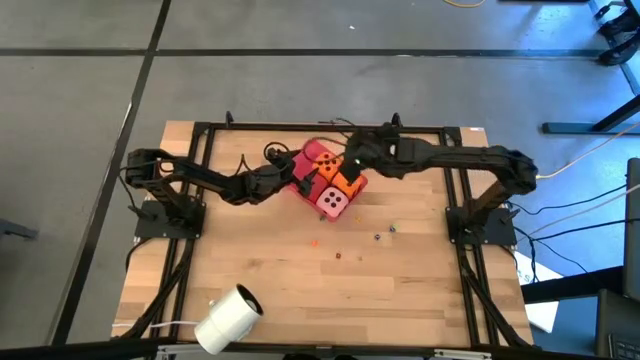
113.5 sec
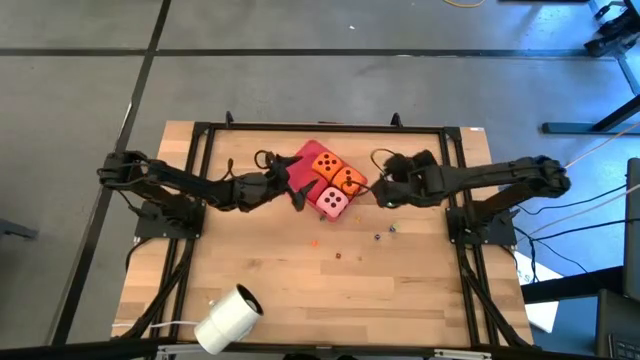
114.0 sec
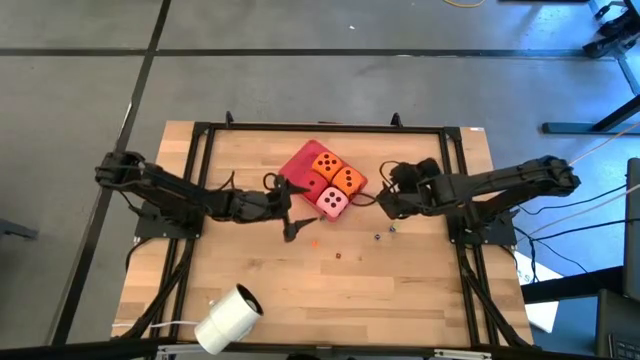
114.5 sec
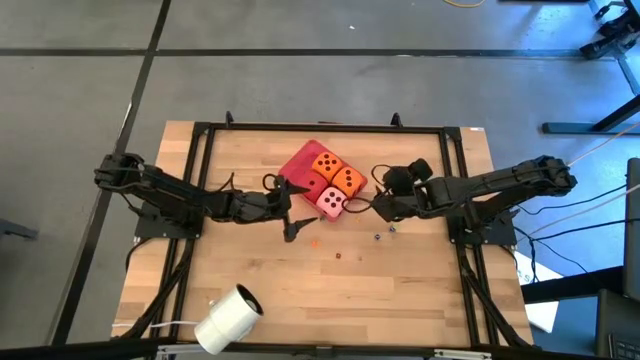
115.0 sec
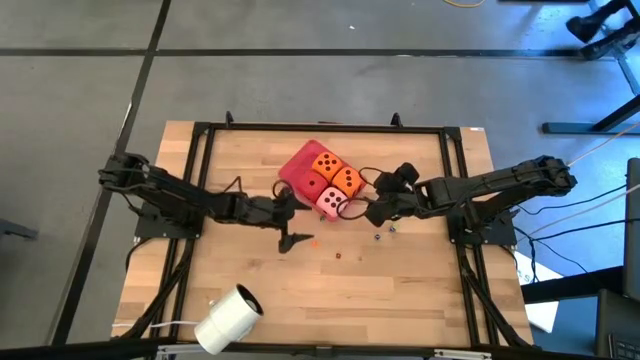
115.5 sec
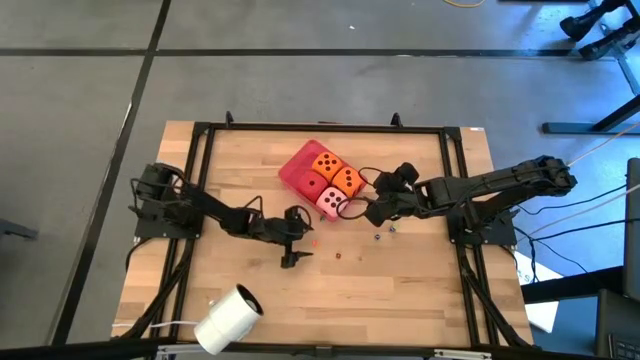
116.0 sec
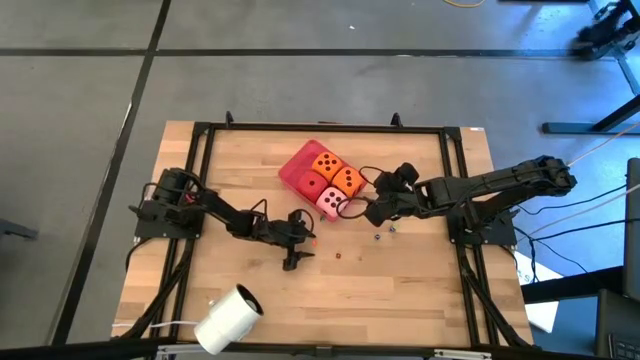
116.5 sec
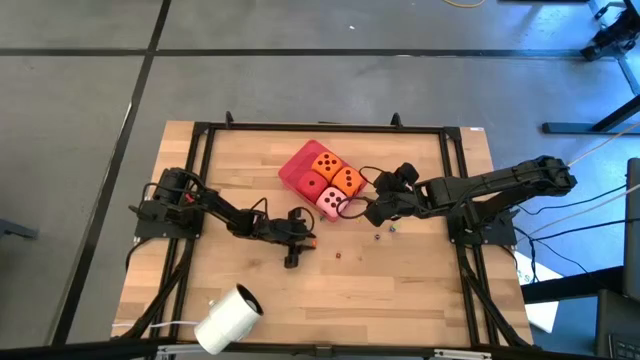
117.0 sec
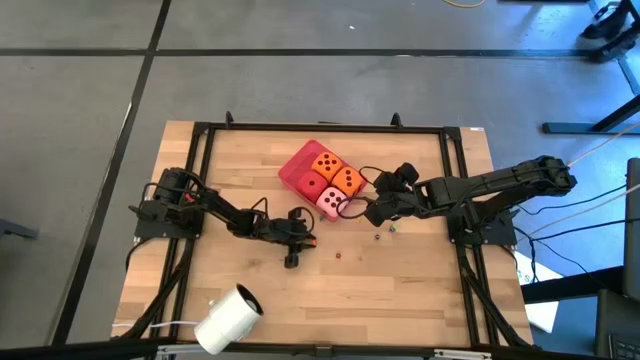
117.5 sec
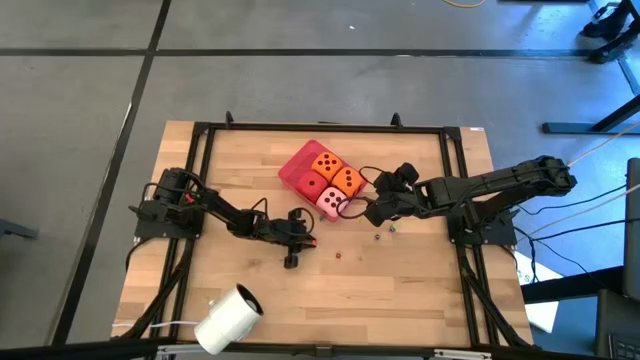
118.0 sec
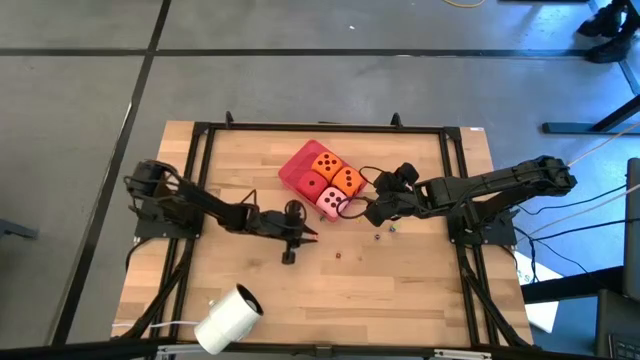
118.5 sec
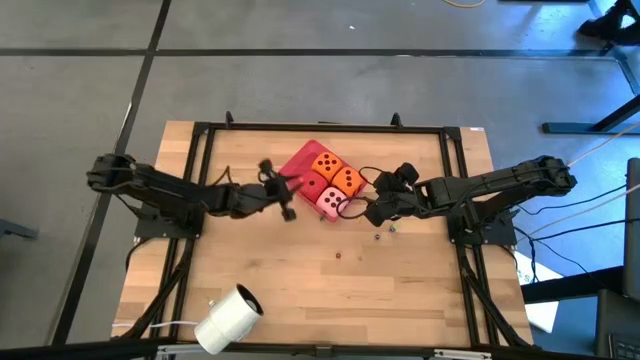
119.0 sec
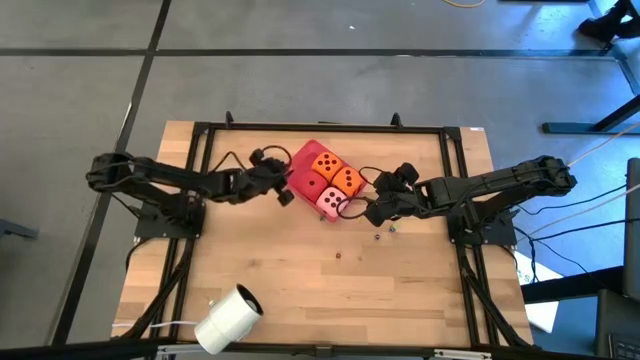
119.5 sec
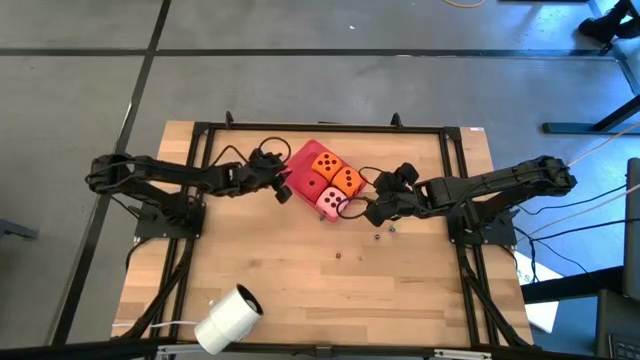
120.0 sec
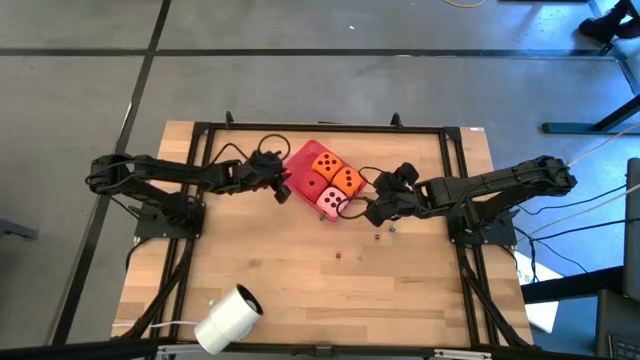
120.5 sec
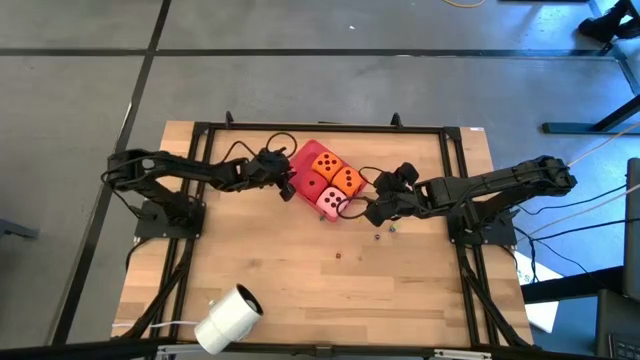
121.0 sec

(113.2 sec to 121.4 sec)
Task: Pick & Place Dice
Put the small orange die into the red bin

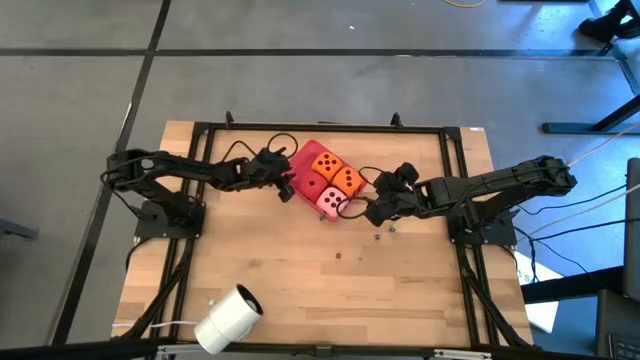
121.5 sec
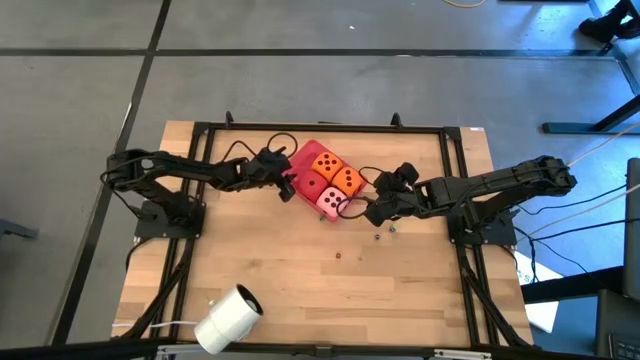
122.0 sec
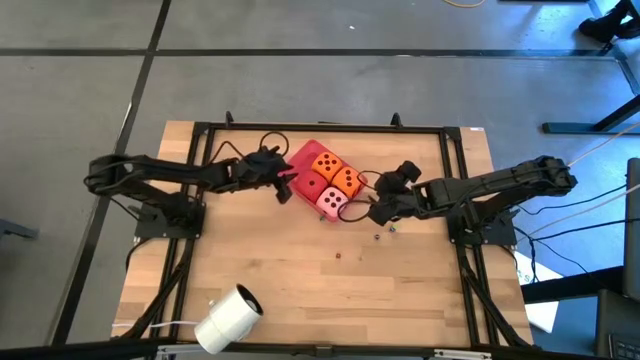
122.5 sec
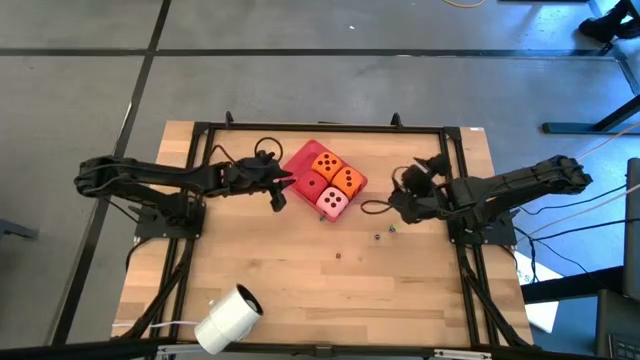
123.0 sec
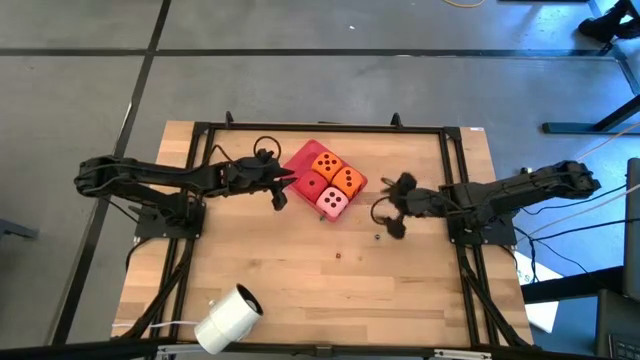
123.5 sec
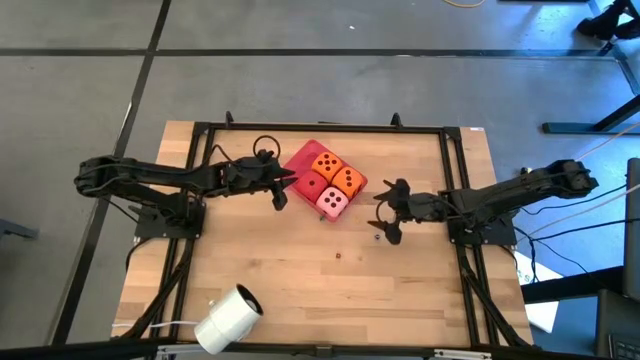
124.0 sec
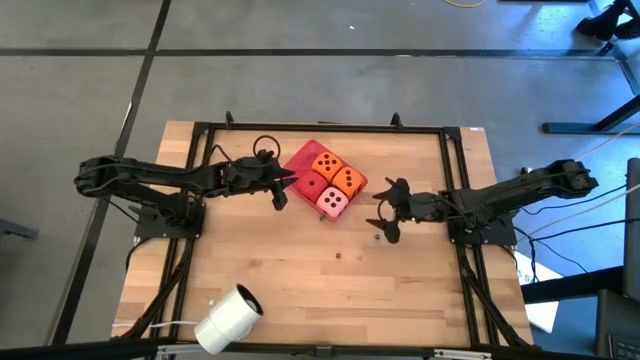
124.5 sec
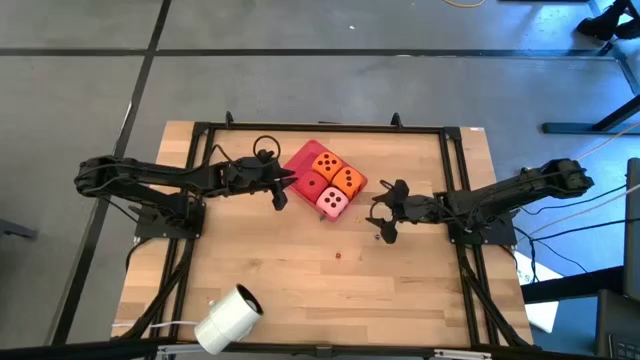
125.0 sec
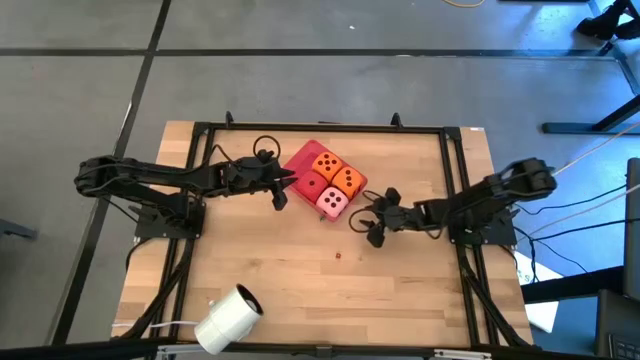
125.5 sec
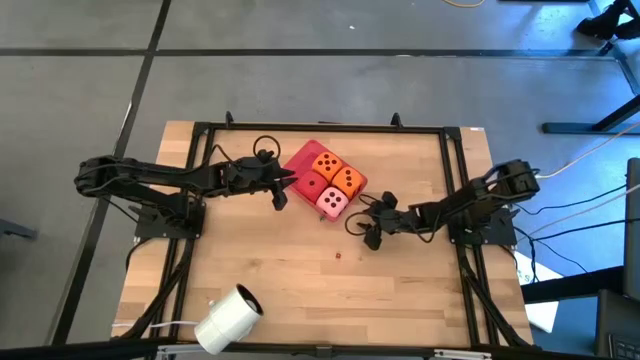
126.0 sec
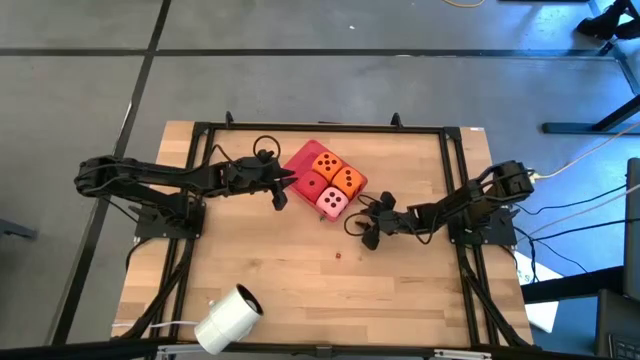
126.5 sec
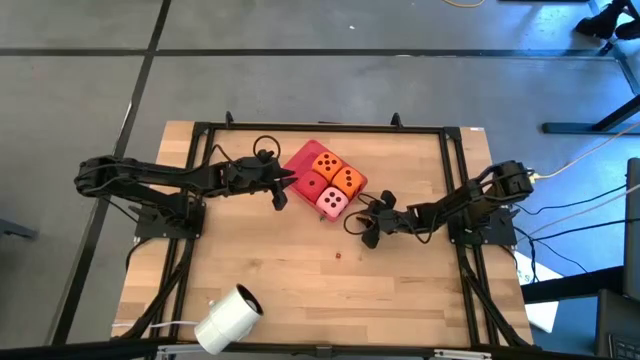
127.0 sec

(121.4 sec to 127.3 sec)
Put the small yellow die into the red bin

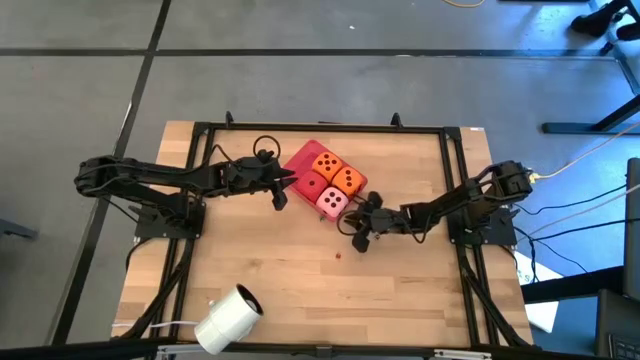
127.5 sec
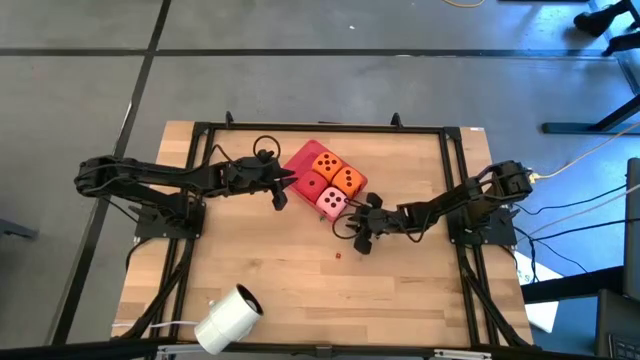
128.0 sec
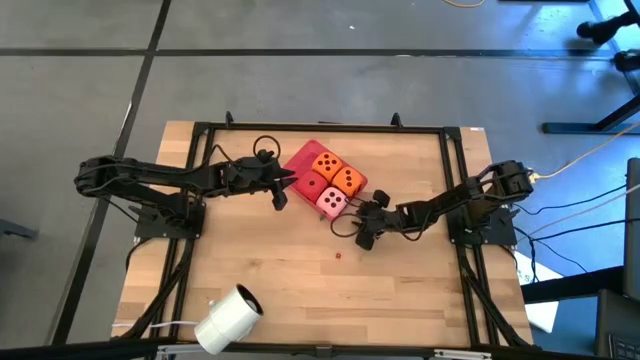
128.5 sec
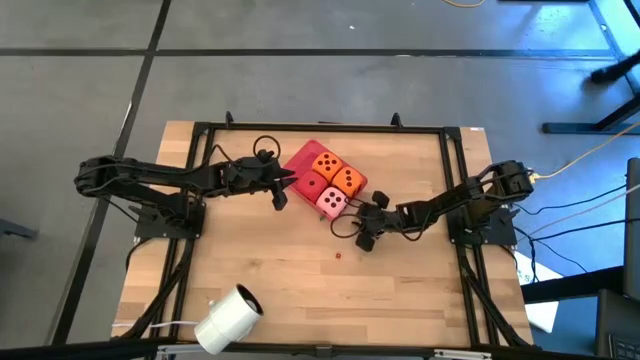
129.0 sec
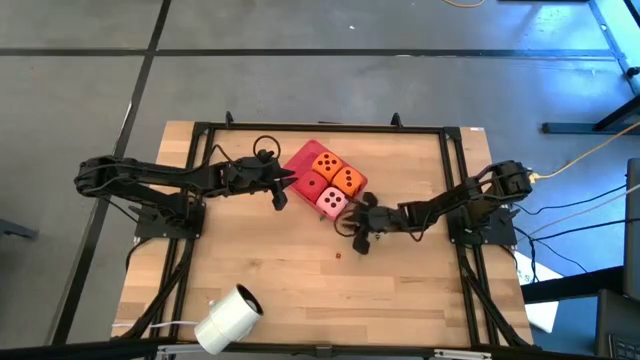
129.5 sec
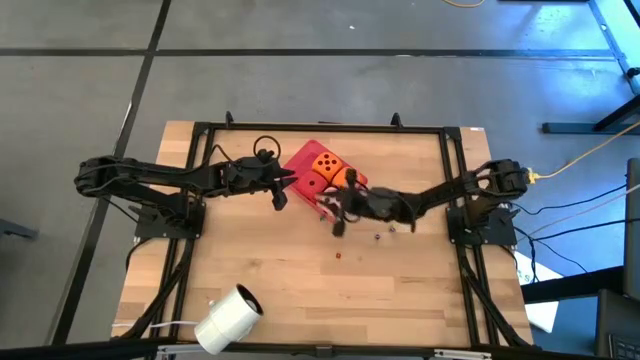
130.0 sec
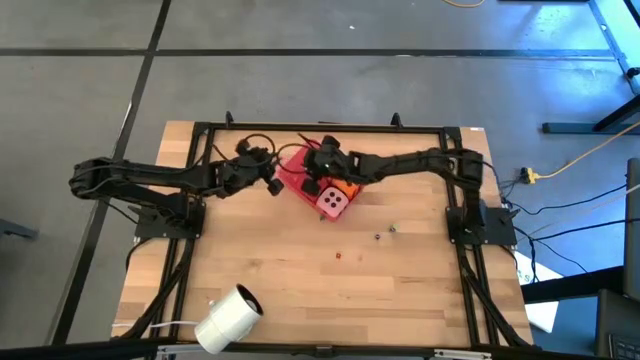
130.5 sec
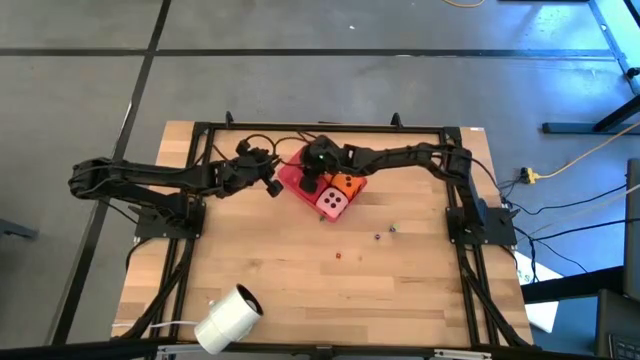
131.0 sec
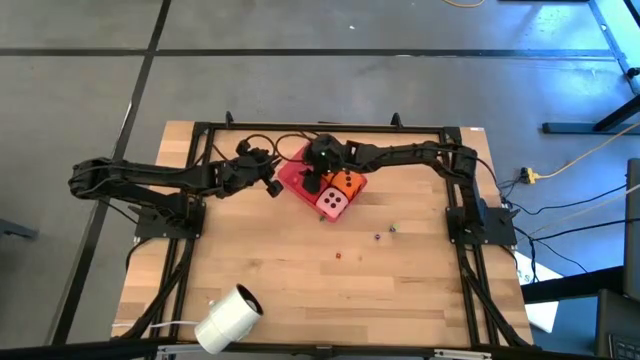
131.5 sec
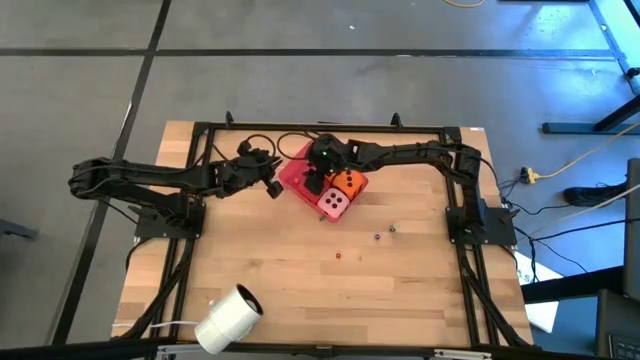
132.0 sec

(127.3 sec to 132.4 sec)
Put the small yellow die into the red bin

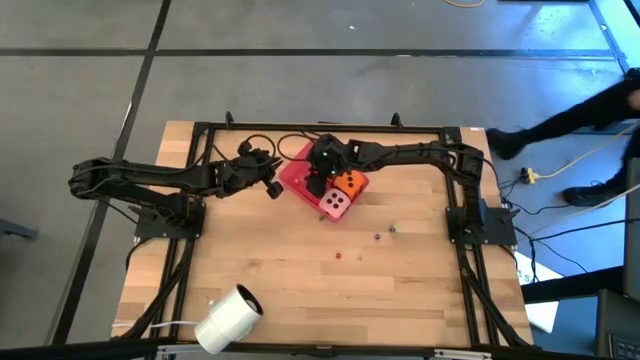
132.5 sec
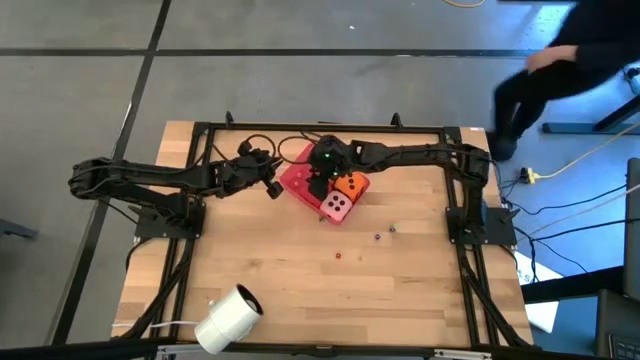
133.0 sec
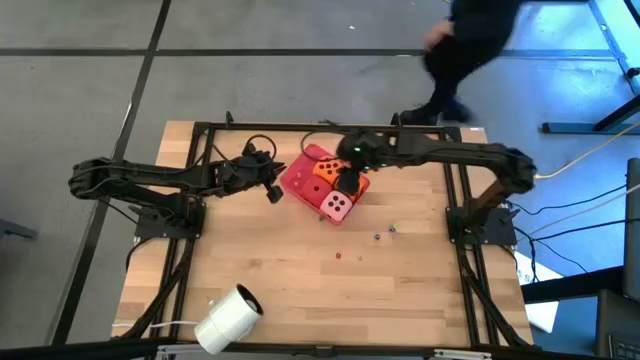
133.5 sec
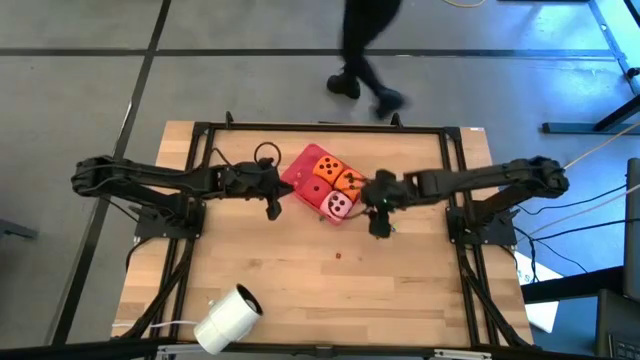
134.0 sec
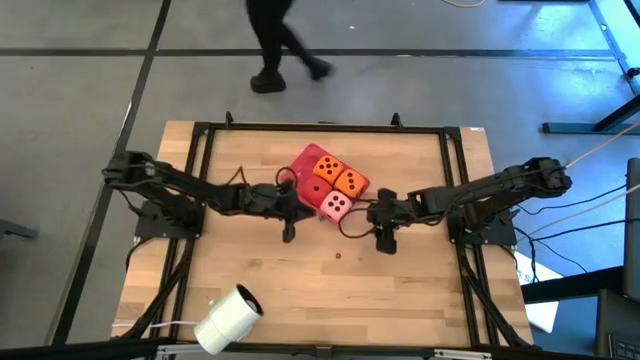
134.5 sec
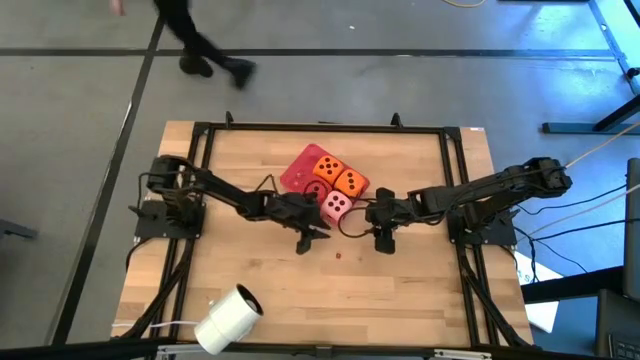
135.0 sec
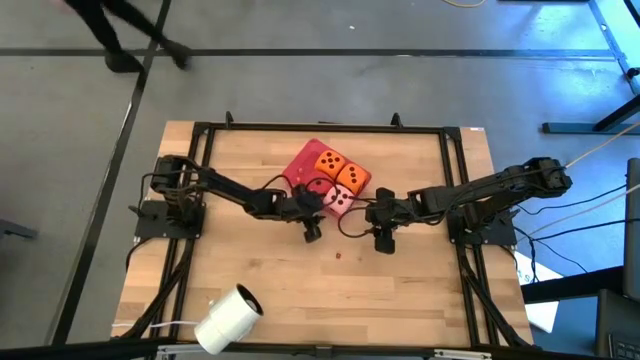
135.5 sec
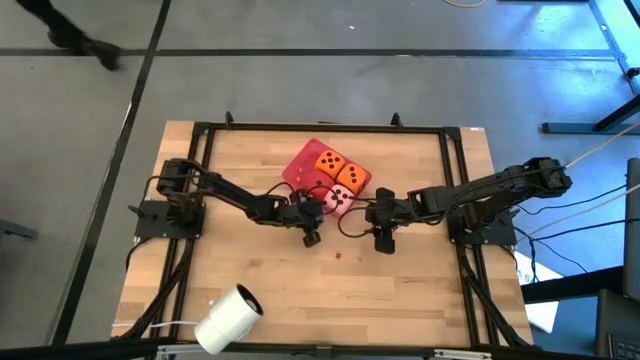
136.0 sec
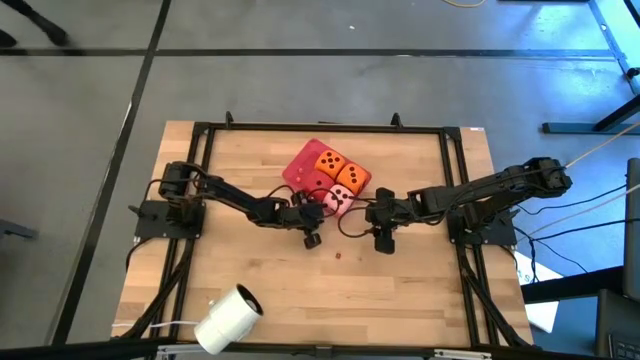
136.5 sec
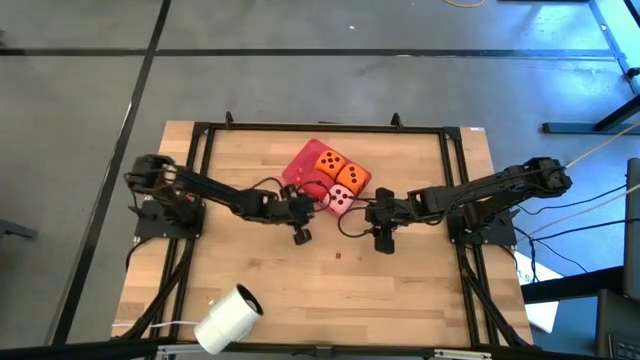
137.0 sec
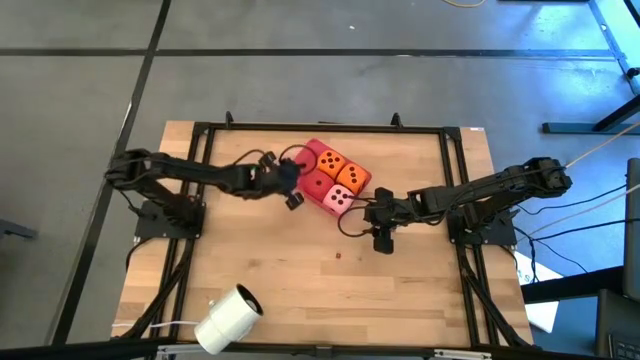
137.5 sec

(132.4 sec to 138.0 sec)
Put the small green die into the red bin
